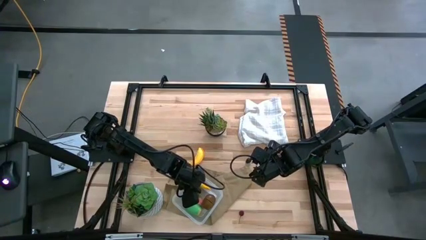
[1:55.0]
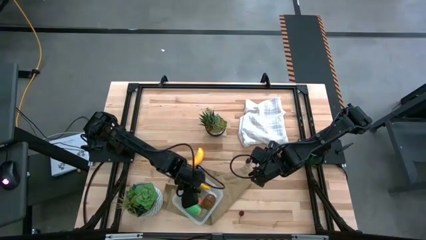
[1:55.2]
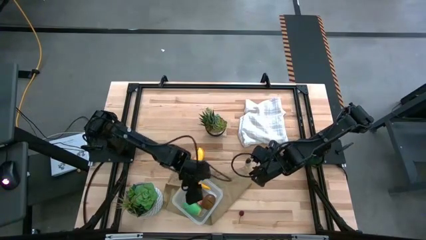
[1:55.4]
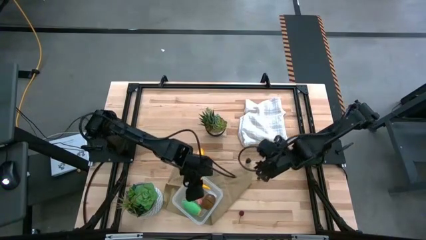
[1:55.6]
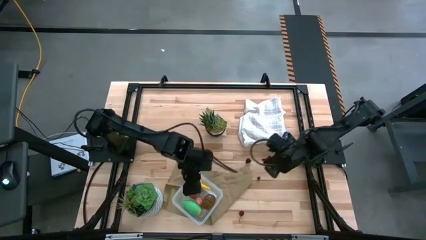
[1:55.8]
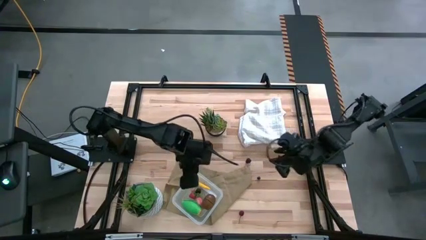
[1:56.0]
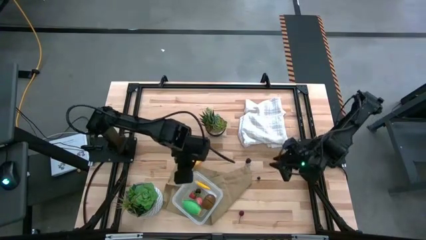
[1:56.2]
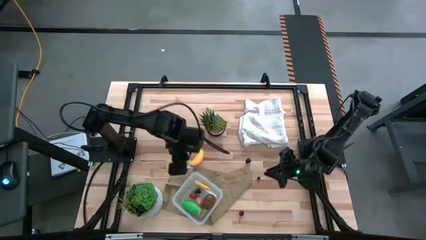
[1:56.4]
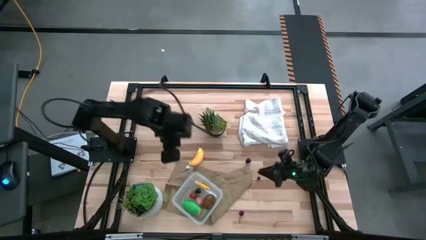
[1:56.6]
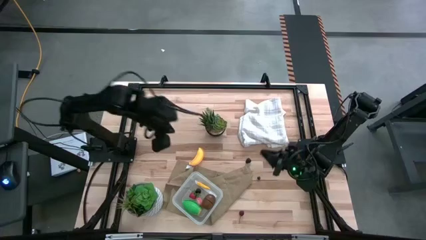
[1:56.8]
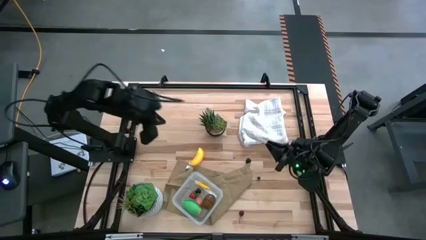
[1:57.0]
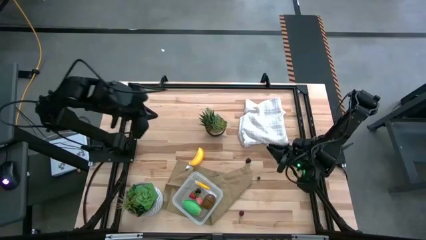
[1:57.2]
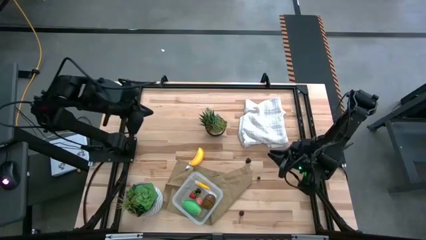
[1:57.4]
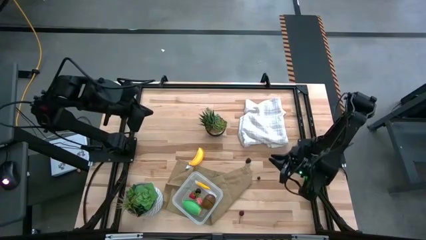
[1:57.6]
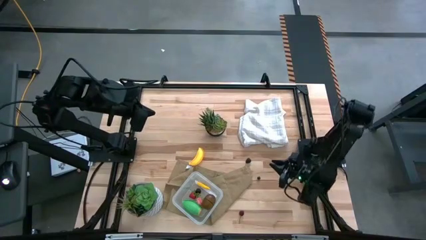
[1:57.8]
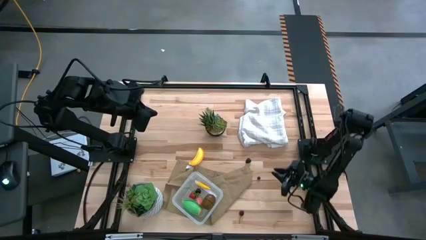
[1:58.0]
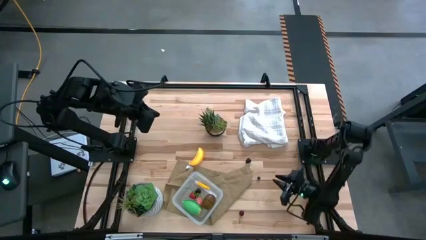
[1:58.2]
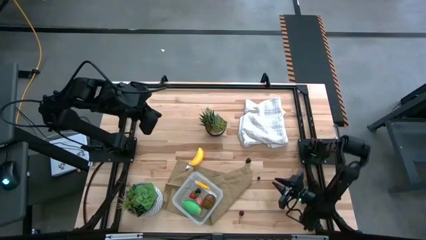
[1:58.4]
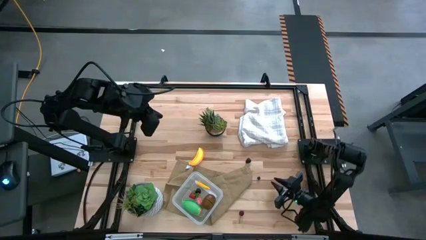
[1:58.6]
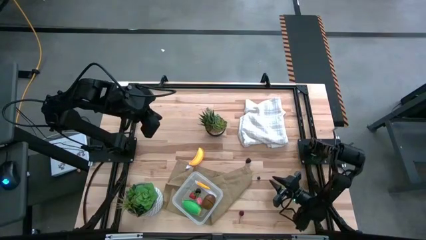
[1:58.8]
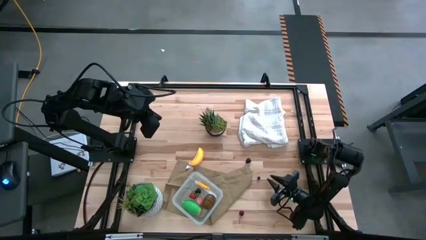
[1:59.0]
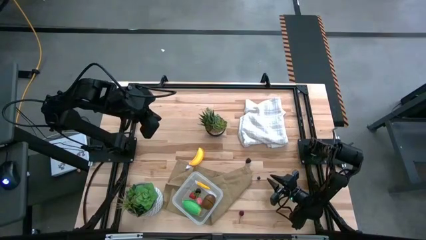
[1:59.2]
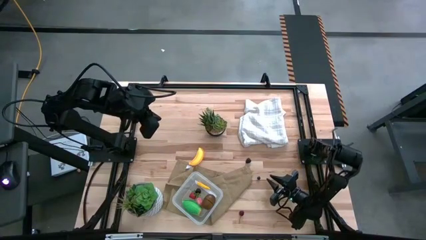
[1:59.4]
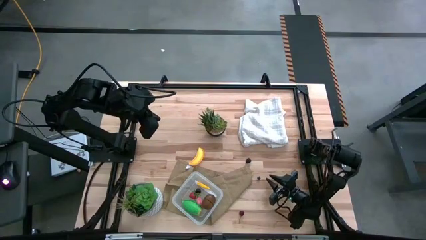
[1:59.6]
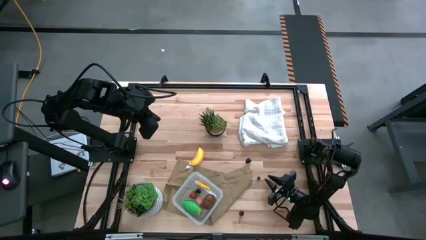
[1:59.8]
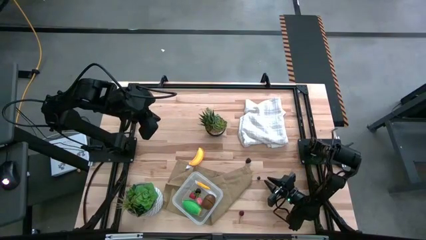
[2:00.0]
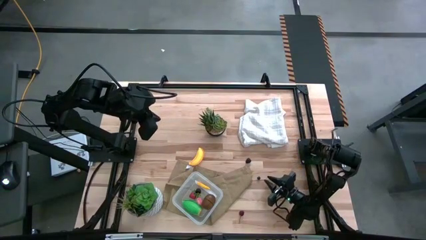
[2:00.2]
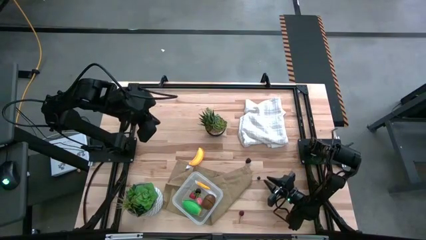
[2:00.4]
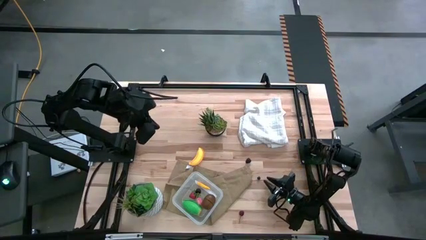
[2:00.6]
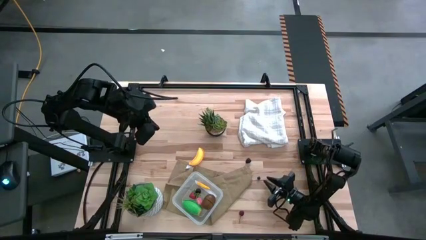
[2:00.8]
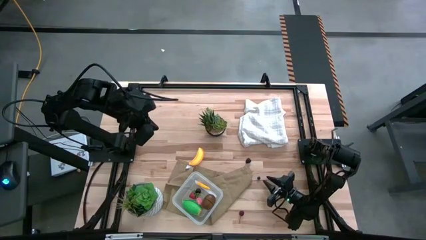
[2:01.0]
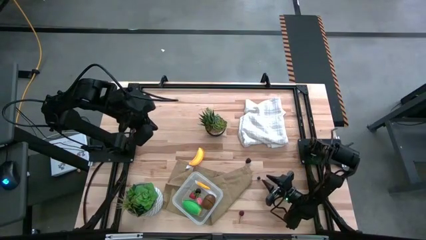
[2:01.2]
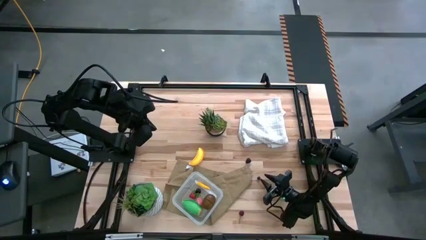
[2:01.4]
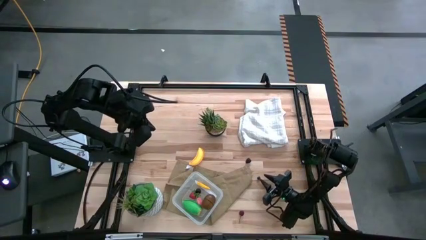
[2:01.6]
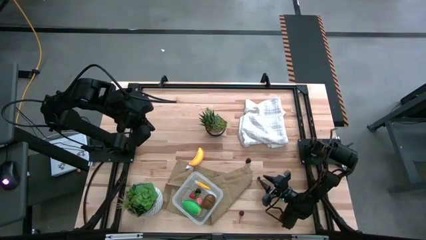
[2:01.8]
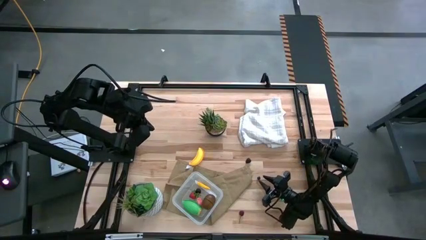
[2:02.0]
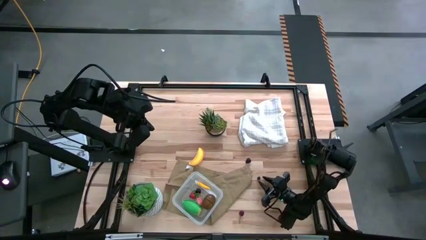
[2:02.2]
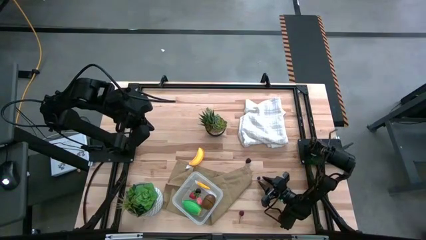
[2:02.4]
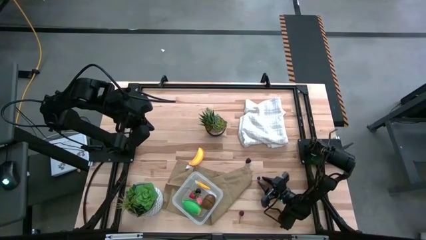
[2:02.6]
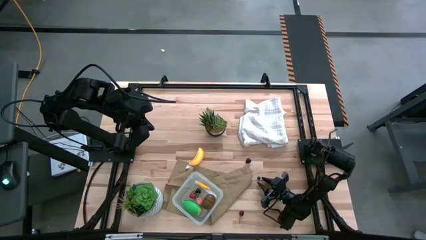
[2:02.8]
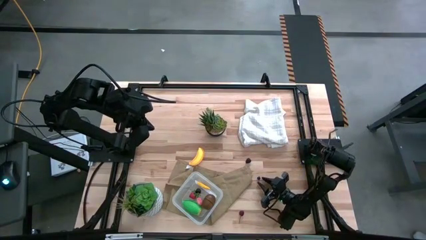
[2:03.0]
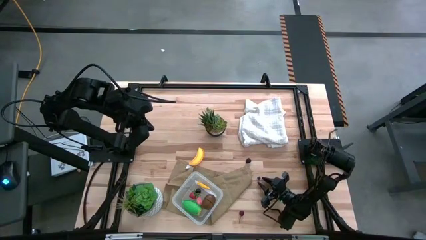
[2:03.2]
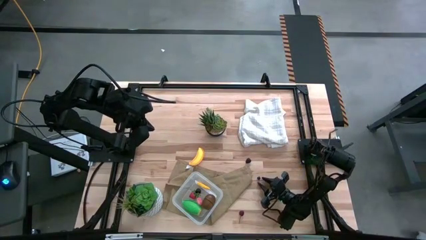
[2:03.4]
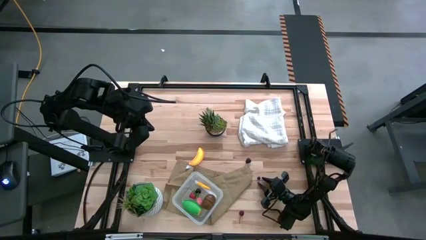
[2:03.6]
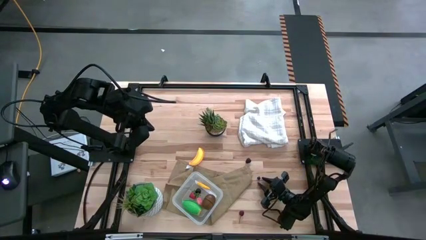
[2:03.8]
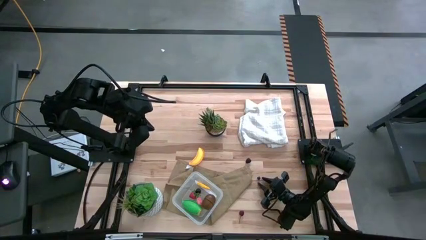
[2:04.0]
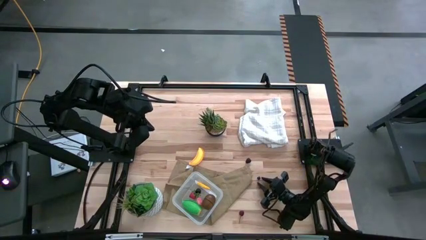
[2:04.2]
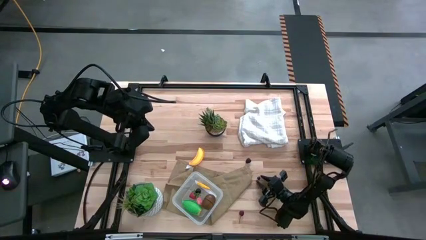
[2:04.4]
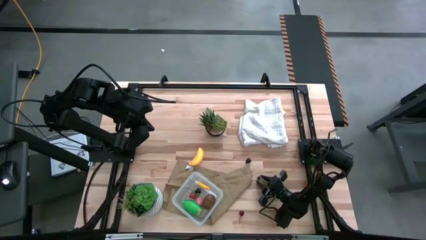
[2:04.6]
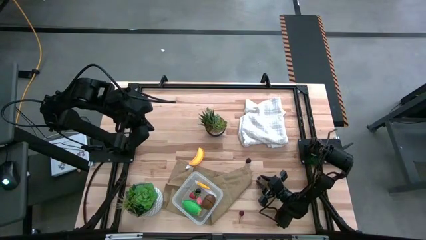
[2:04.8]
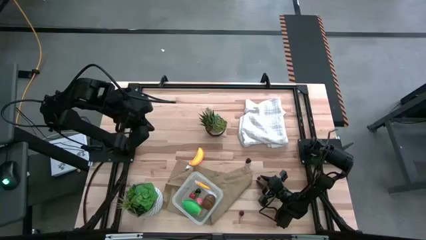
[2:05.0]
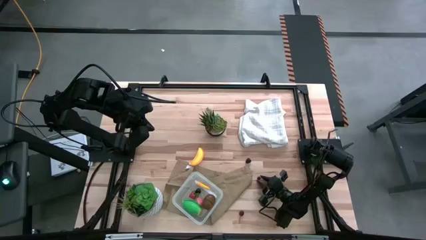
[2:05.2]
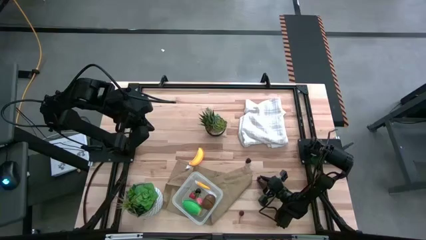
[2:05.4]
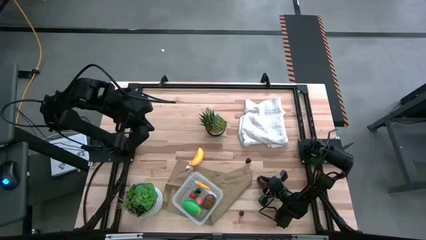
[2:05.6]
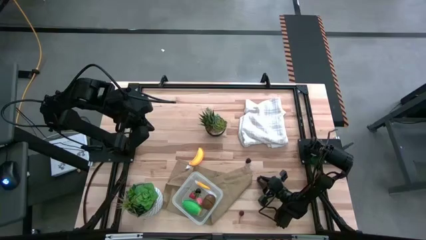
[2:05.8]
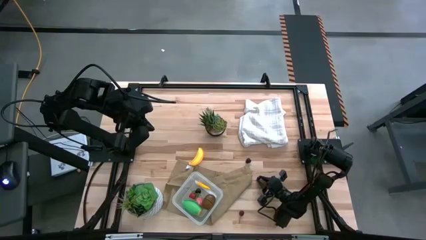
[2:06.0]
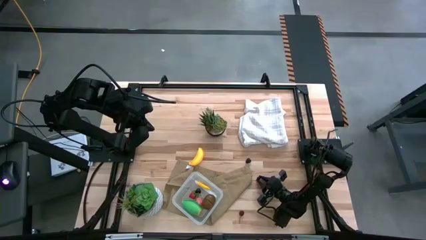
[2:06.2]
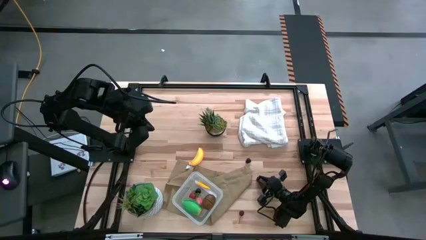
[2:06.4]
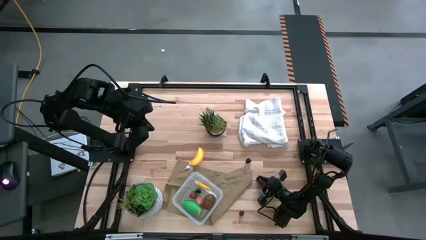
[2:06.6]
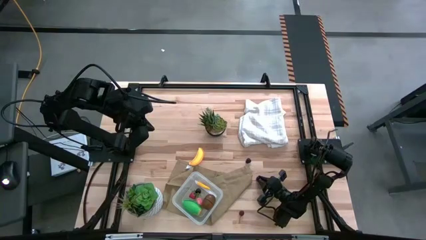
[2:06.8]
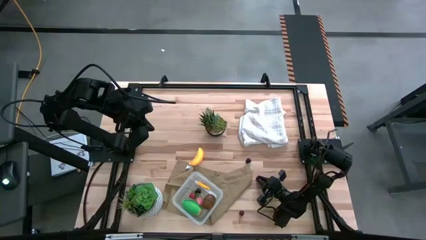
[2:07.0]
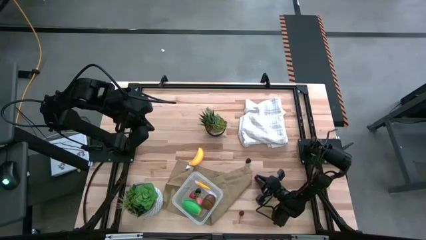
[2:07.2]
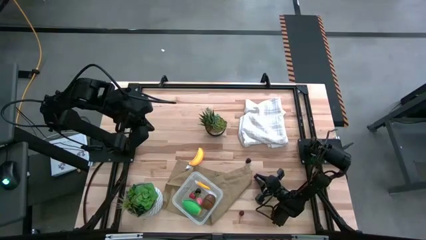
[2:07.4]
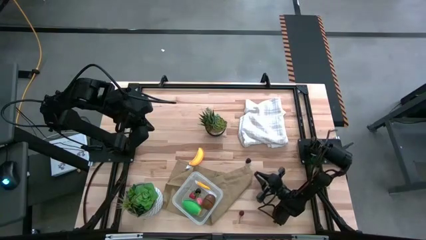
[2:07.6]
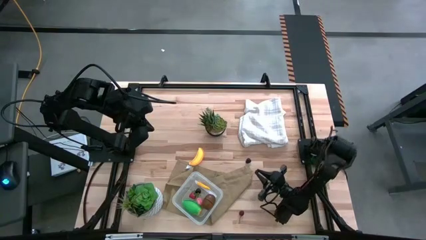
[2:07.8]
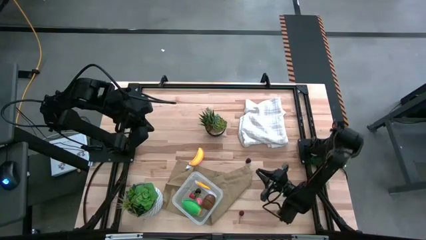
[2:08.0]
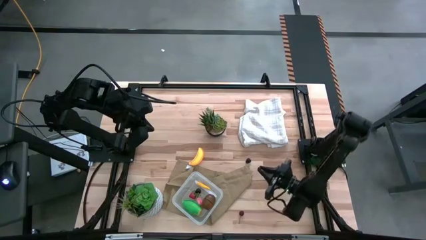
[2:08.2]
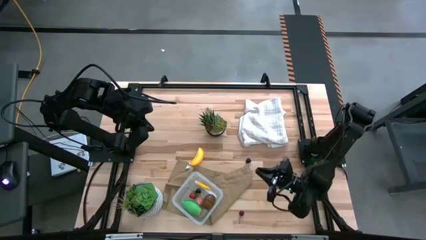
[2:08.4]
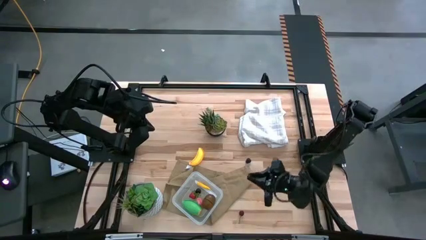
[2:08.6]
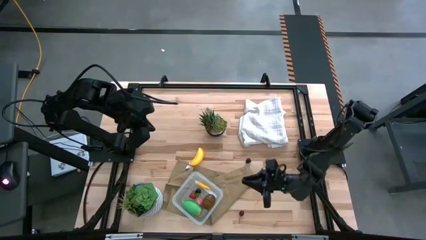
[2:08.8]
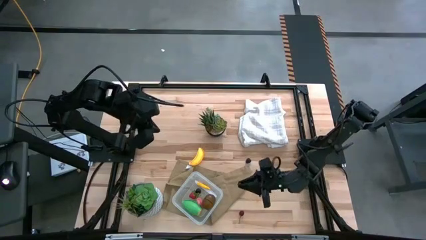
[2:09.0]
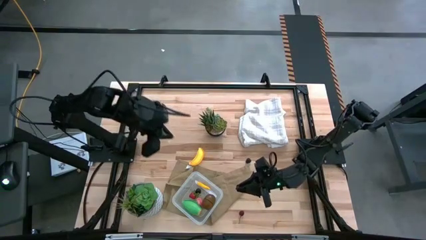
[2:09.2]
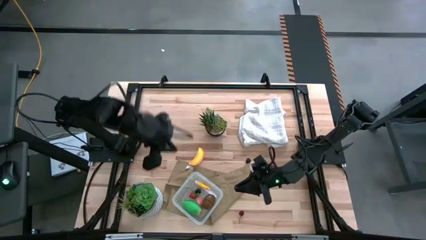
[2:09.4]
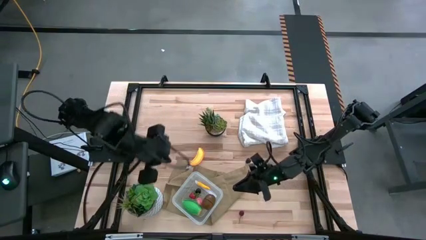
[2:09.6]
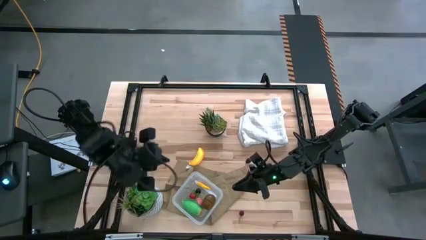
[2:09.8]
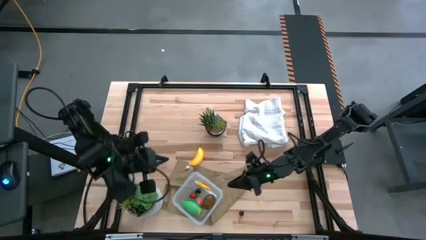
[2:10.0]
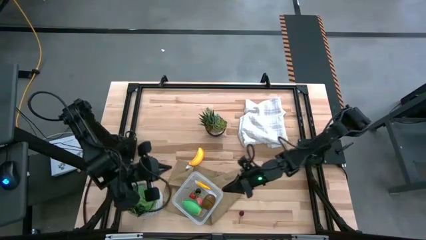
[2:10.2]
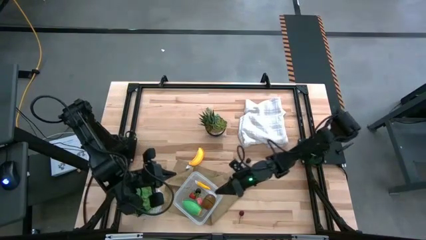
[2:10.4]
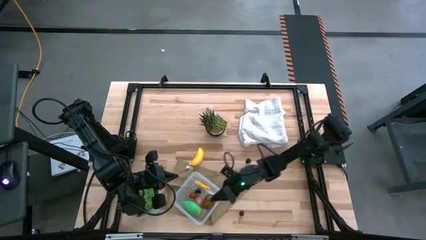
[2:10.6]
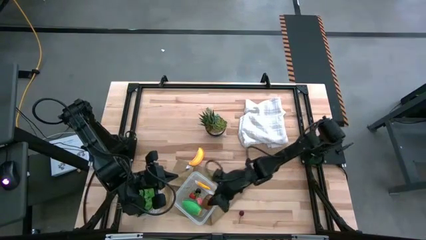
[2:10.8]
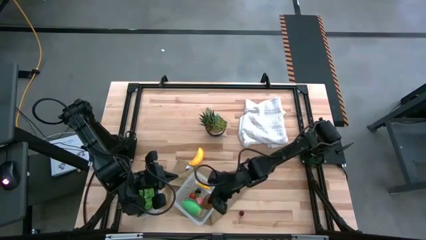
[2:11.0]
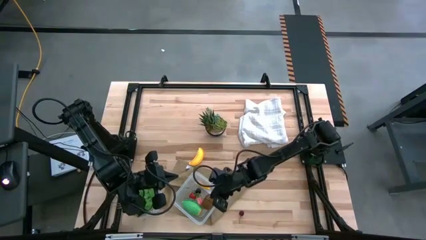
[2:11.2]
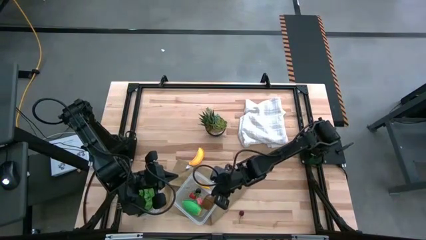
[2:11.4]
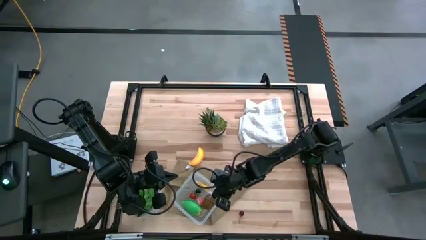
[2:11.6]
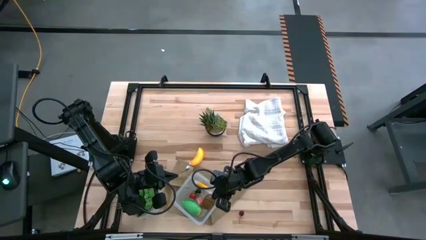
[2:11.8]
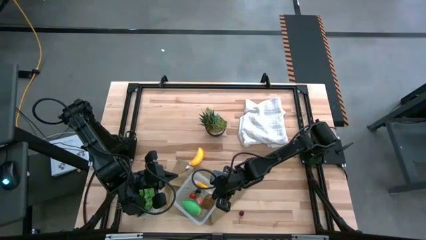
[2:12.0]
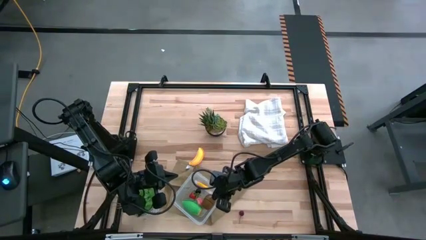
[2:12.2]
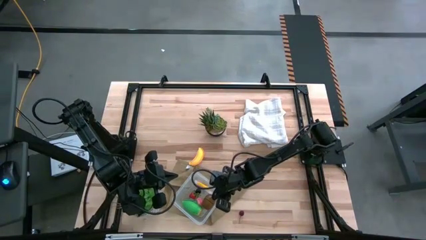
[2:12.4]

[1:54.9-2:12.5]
Task: Pick and placing Produce into tupperware
Put the blueberry into the container
